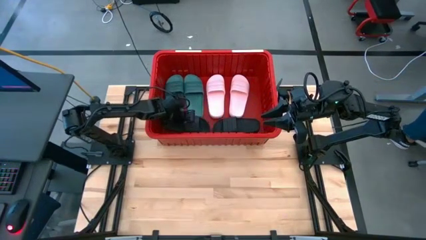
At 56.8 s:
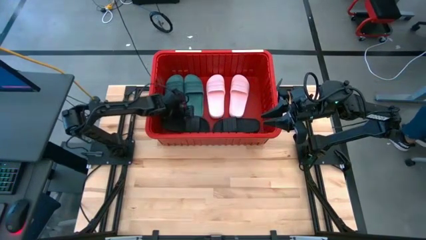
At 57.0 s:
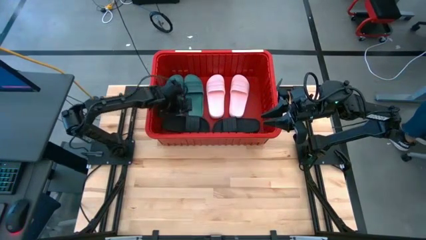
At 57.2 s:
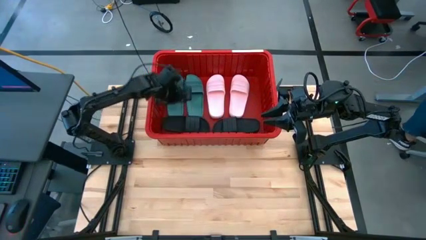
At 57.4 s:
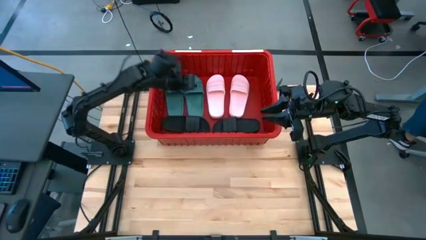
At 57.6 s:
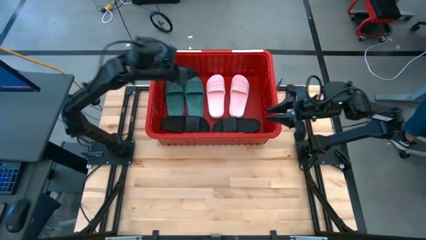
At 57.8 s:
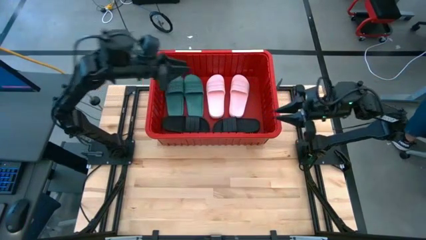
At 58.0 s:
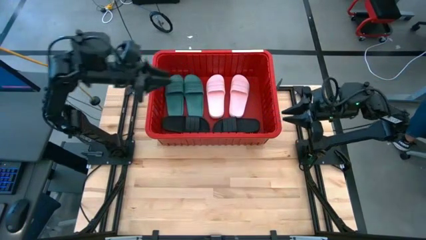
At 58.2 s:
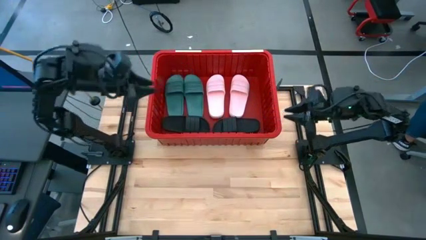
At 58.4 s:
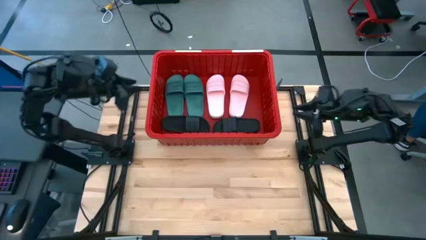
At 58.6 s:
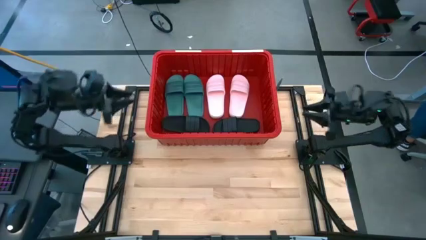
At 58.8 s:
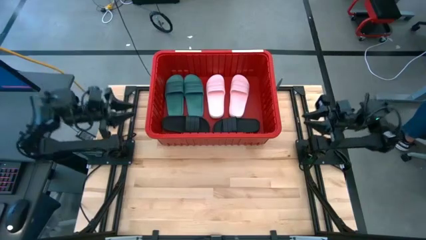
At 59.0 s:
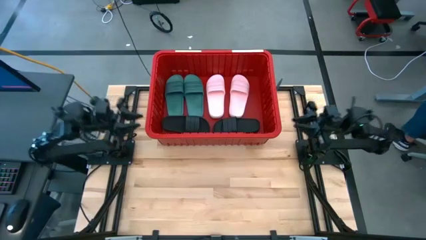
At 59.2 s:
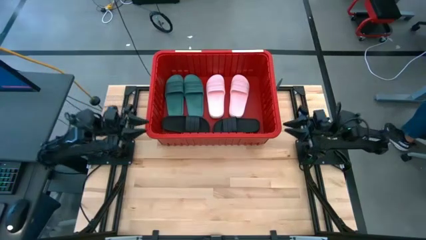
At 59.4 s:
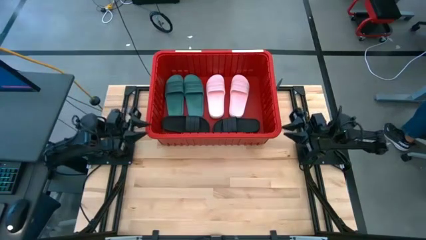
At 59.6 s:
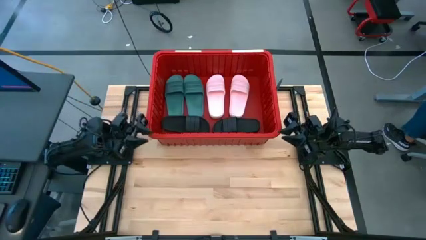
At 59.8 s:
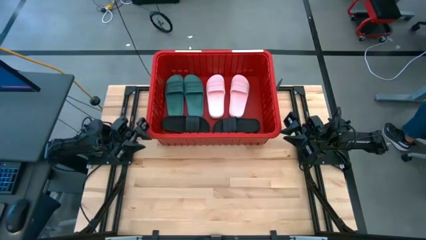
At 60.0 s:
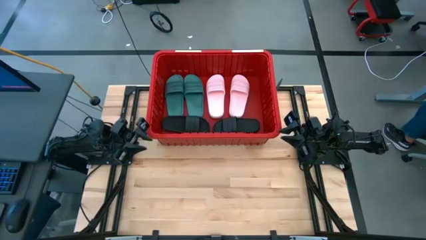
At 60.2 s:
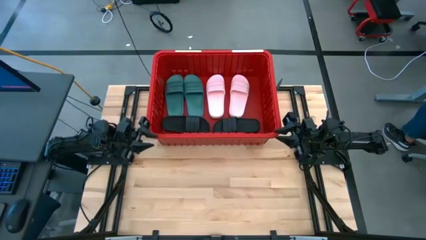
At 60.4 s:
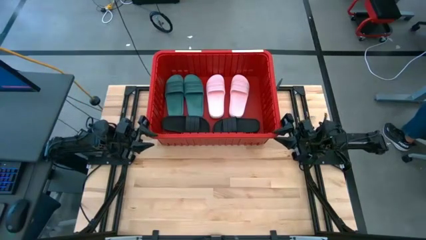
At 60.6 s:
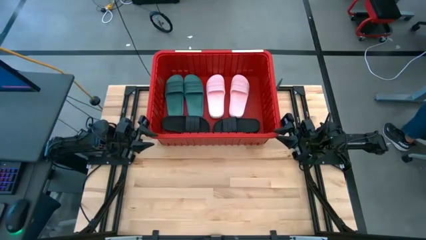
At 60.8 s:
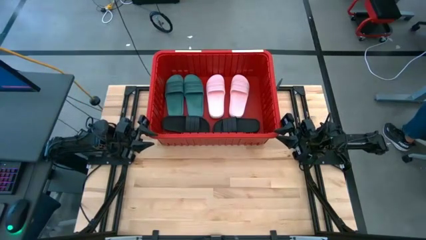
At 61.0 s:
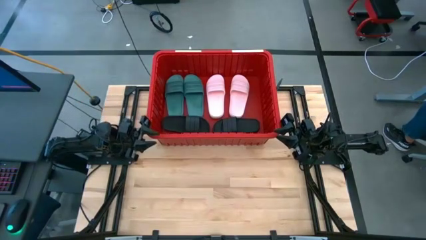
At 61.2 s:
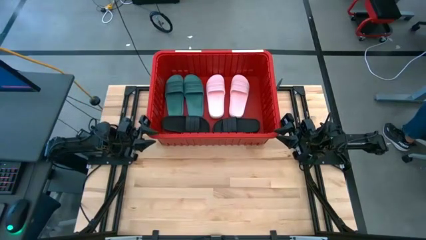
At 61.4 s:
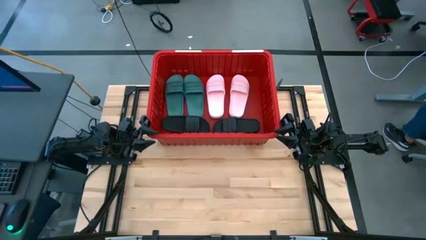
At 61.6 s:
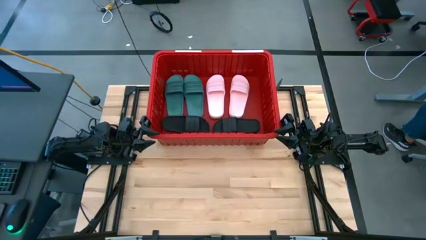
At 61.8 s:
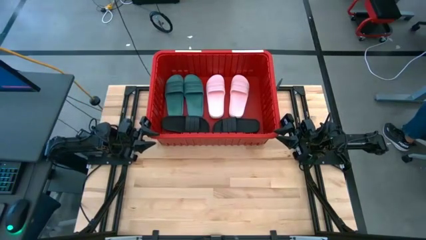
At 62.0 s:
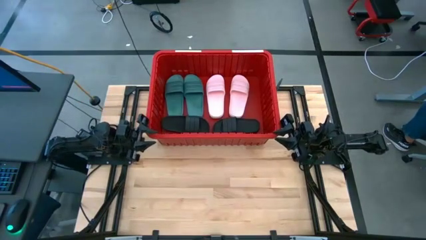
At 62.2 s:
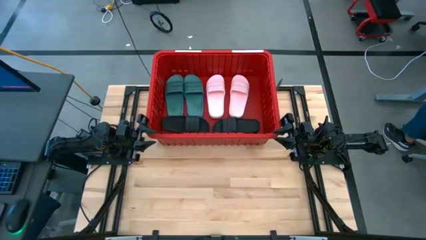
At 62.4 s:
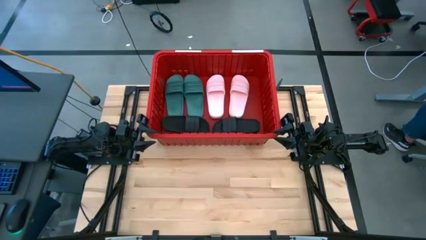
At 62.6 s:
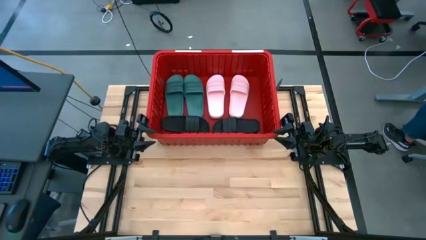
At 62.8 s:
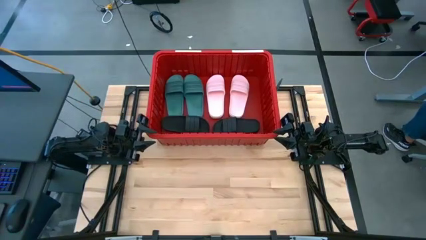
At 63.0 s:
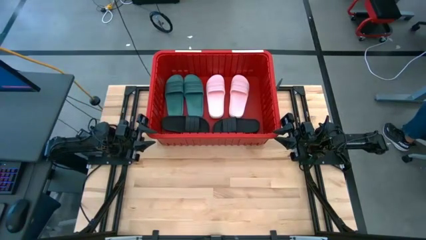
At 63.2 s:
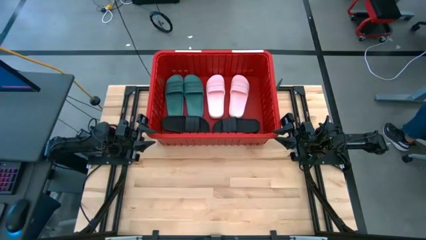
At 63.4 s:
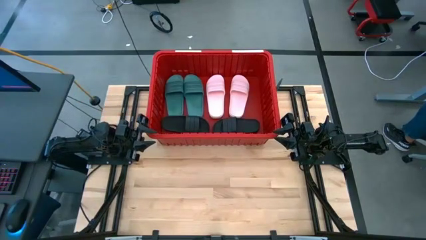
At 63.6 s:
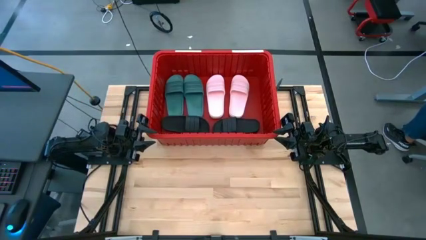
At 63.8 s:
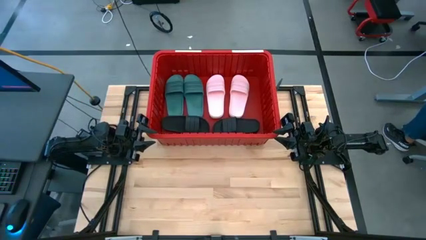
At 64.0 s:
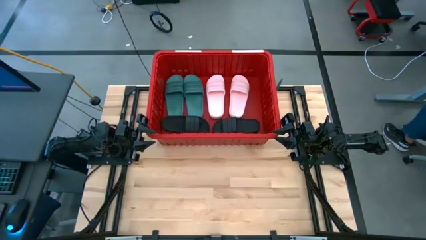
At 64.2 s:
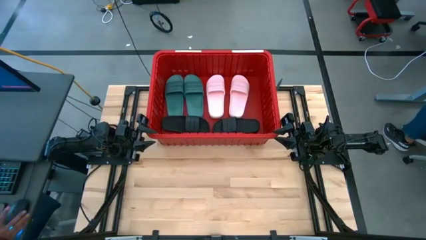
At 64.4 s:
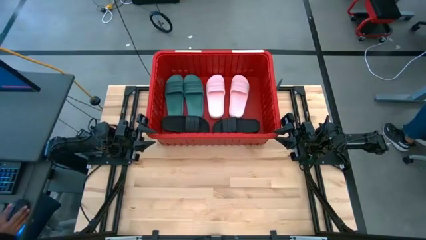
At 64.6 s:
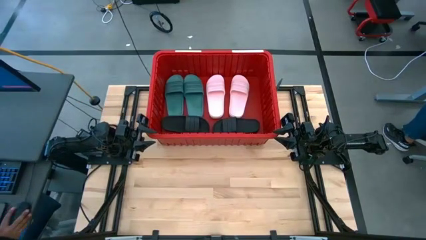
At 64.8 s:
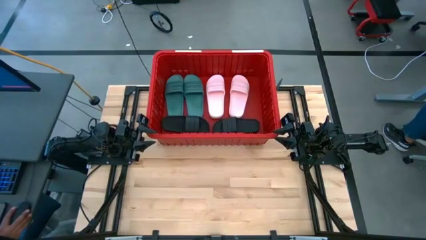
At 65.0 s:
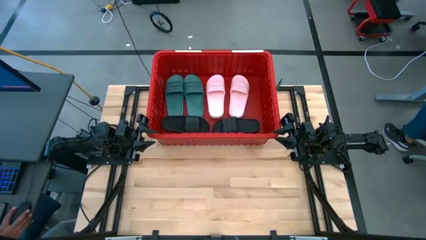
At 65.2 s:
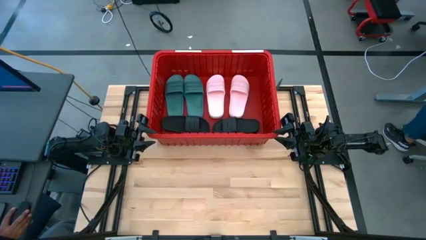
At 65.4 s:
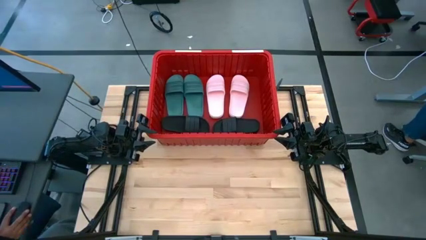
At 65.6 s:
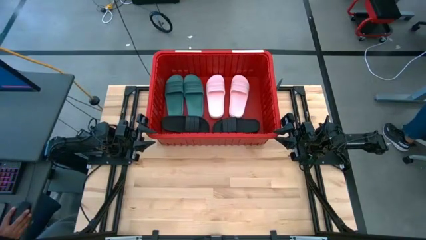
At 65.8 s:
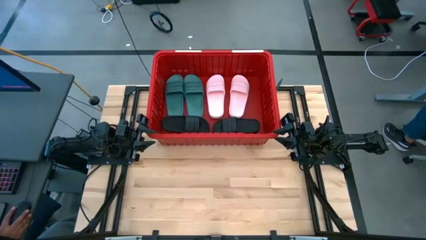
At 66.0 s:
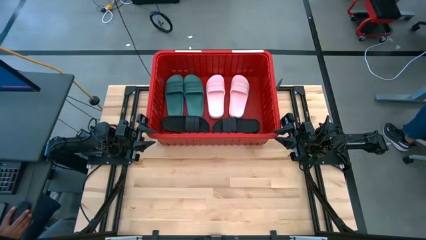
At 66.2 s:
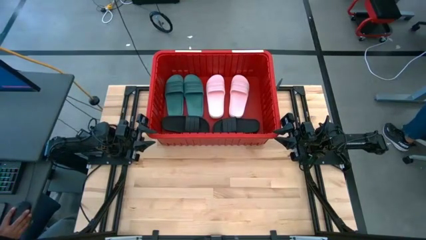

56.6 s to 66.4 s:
Task: Pick and place slides into bin
Return to Home Position

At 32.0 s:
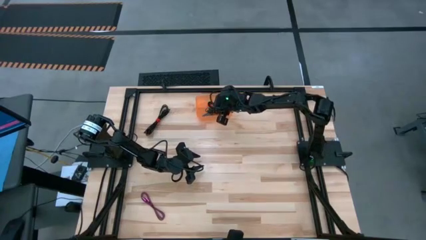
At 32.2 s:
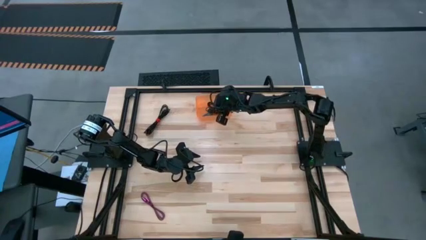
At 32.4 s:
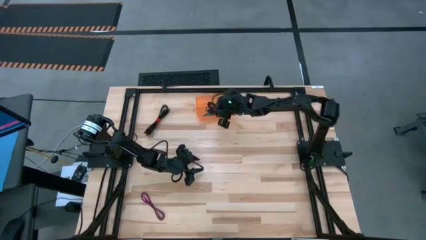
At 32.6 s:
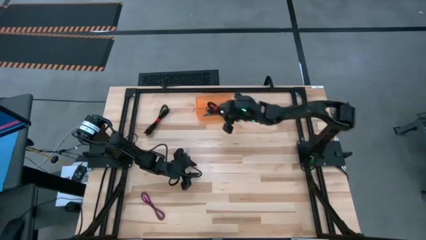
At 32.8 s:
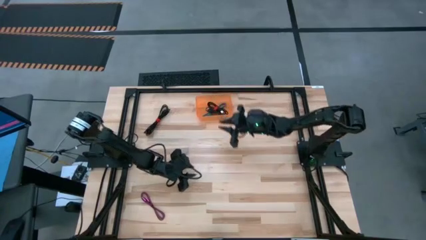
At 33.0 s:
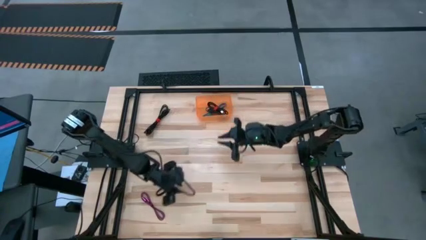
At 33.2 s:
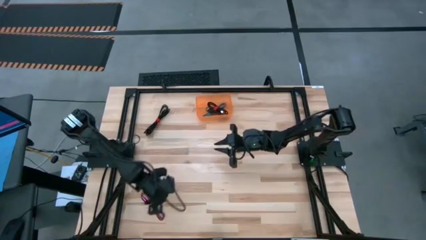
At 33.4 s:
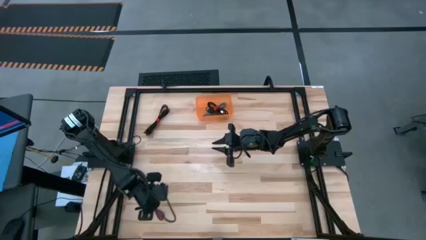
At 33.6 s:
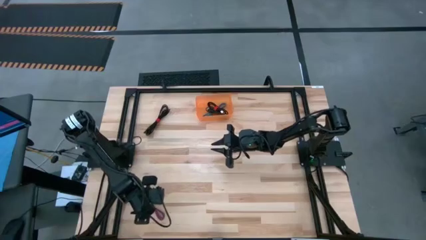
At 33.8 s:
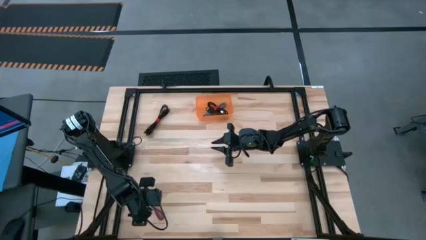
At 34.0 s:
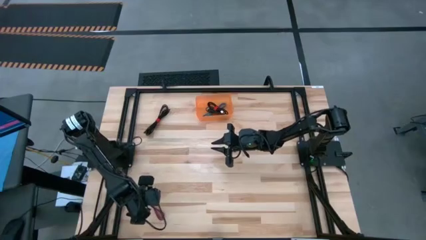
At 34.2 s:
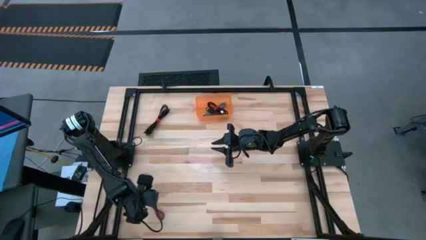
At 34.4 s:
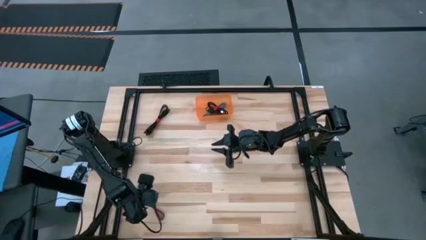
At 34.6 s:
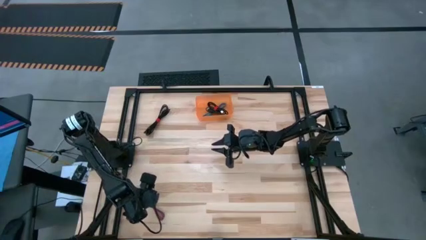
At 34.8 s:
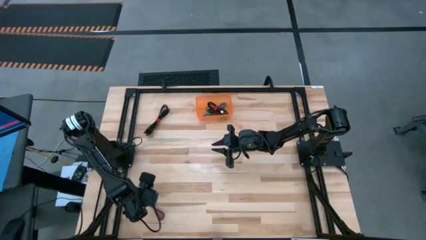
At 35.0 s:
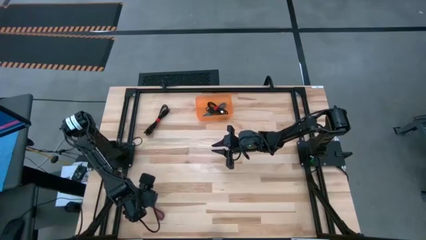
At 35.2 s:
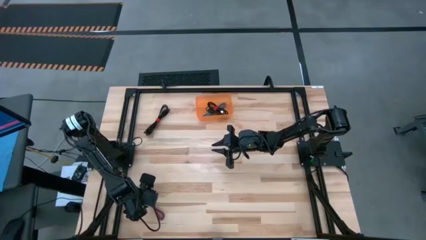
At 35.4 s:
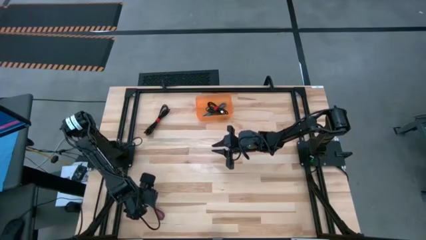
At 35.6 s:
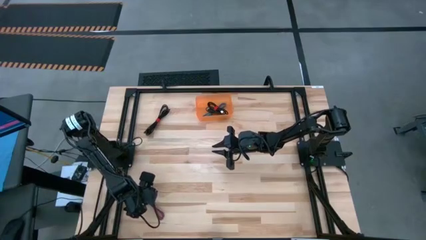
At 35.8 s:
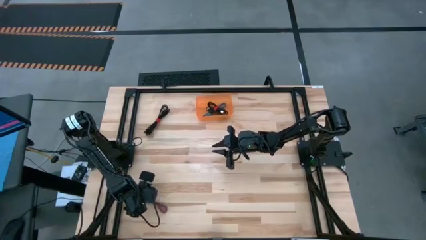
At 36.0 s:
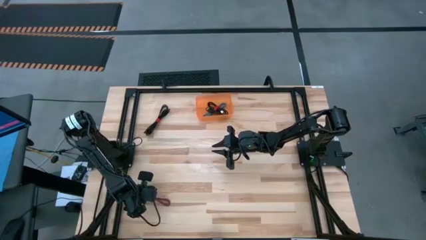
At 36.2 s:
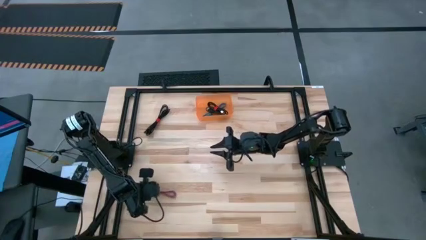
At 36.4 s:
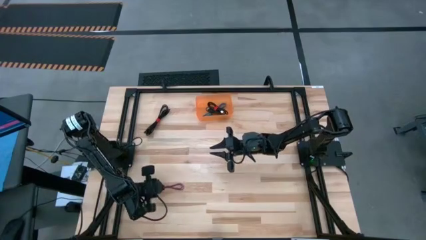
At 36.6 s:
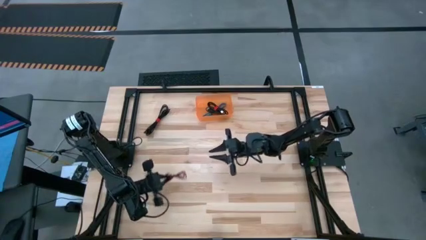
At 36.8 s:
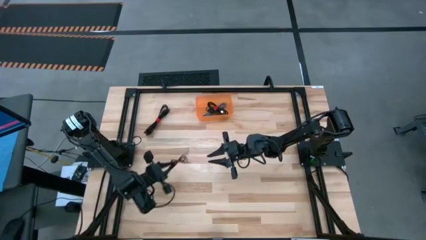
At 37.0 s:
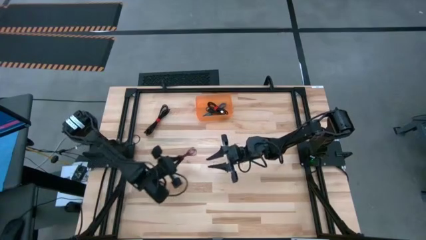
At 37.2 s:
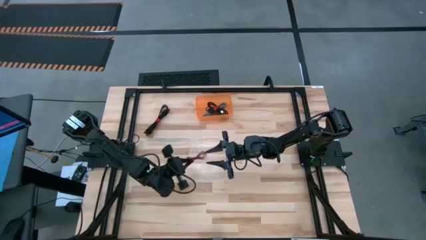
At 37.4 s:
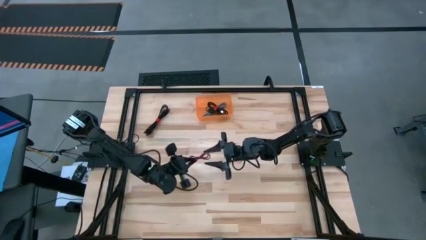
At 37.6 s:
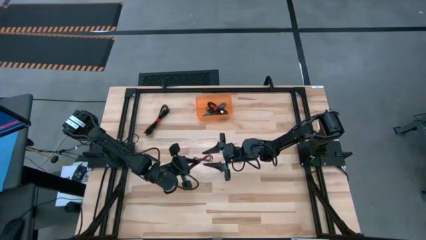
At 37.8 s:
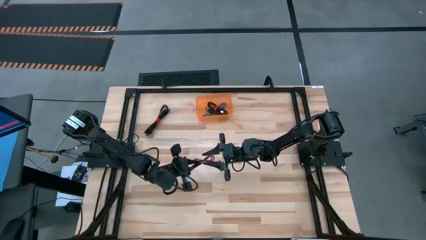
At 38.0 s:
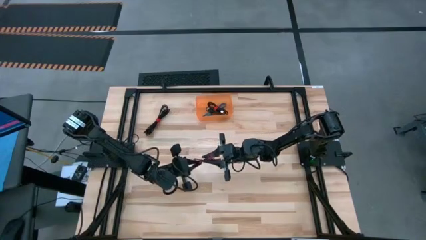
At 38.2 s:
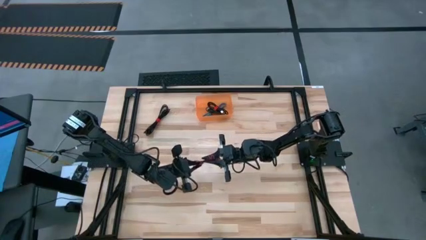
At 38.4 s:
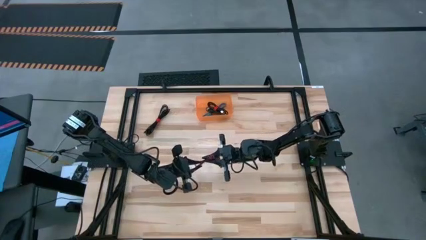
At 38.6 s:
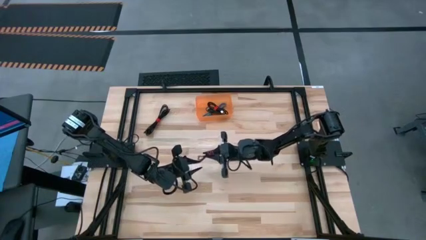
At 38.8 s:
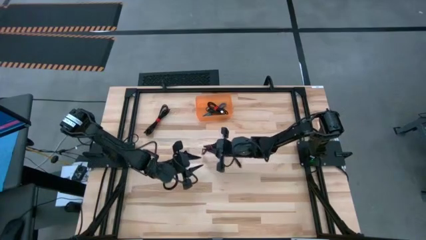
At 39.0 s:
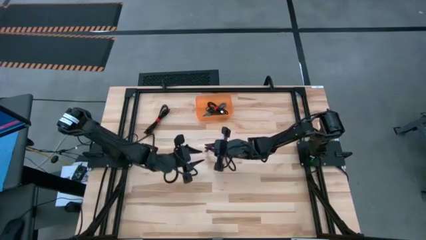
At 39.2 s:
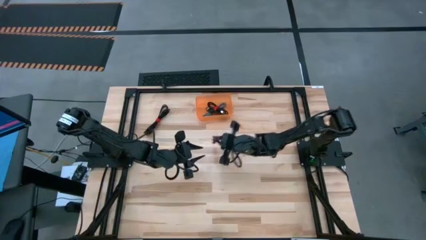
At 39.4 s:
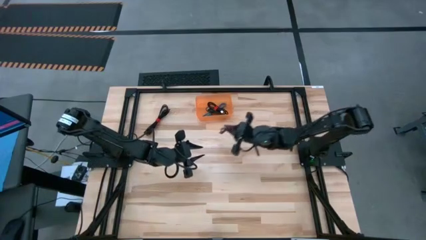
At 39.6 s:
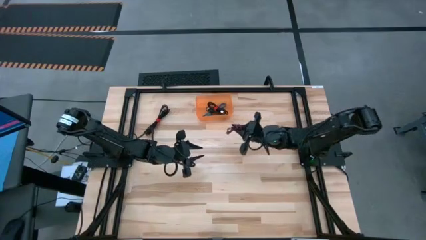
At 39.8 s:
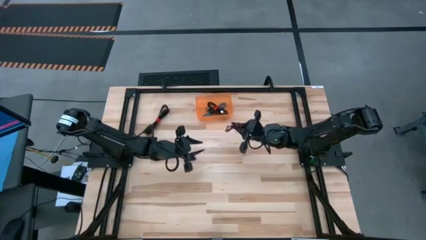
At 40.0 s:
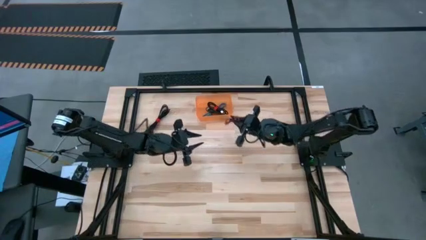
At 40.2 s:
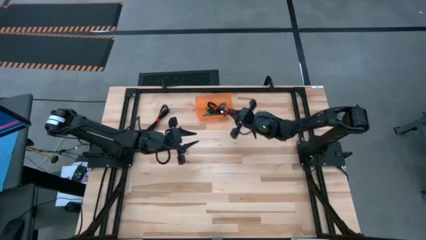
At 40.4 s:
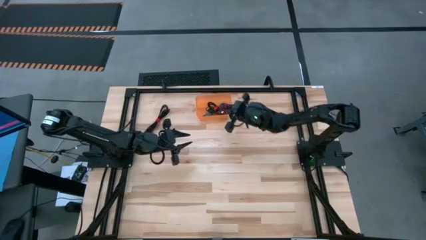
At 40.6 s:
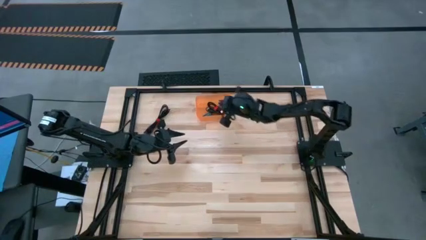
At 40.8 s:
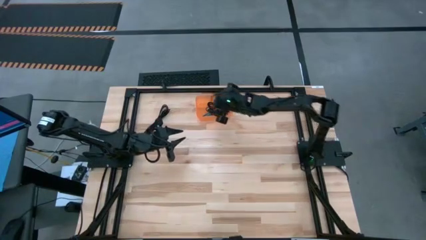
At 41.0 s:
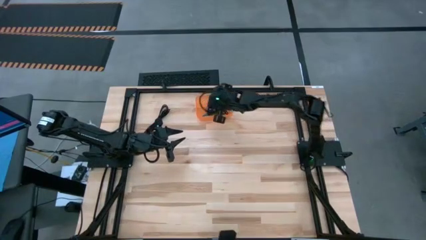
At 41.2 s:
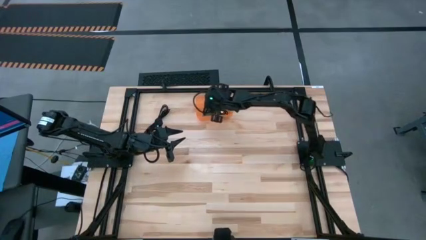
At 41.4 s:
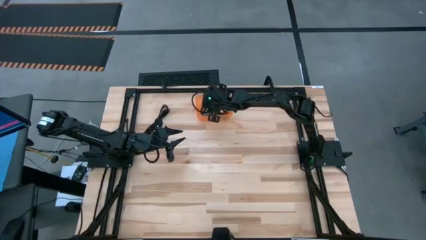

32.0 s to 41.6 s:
Task: Pick and place USB-C Cables
Put the pink charger cable into the orange bin
